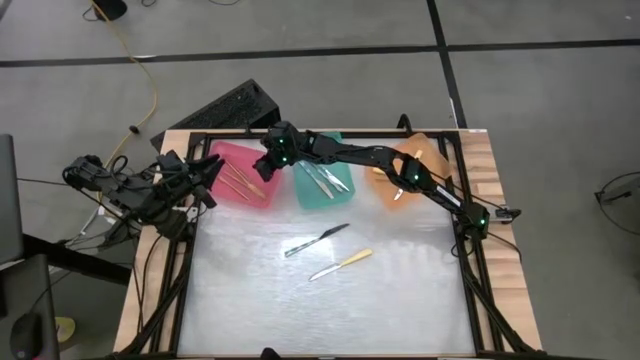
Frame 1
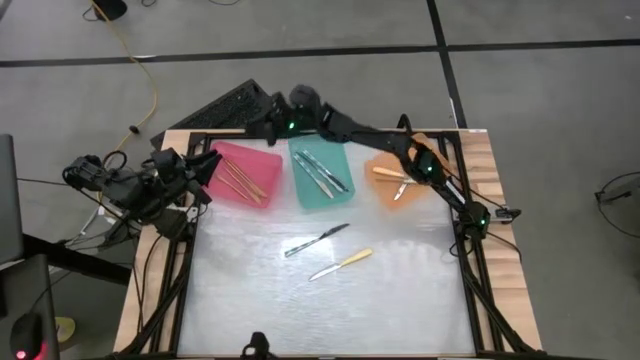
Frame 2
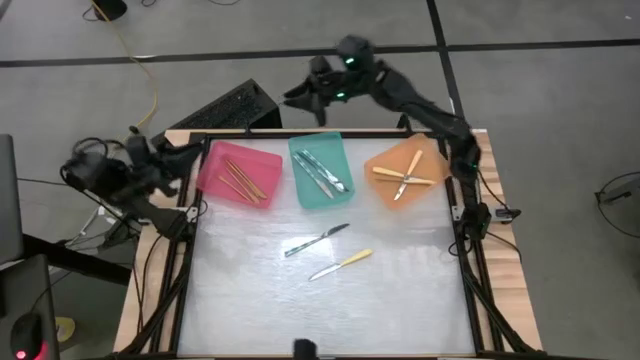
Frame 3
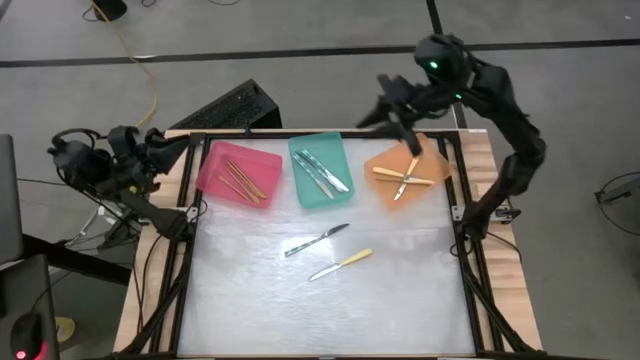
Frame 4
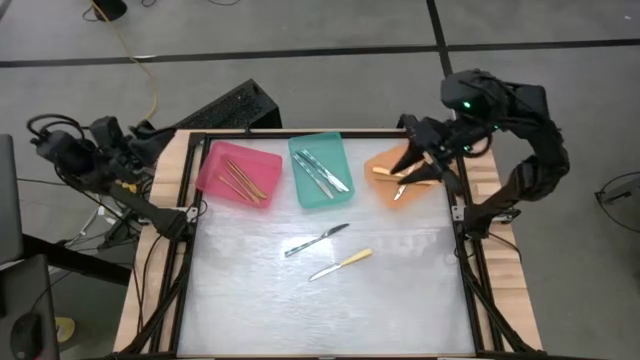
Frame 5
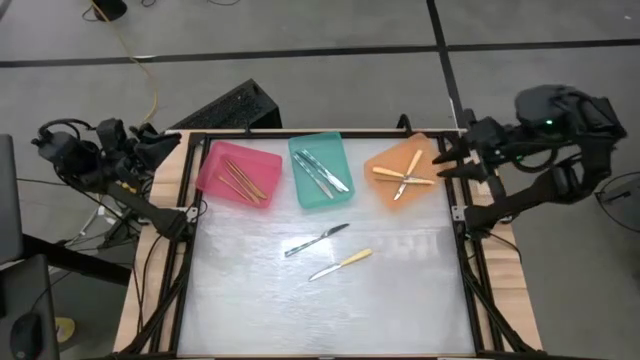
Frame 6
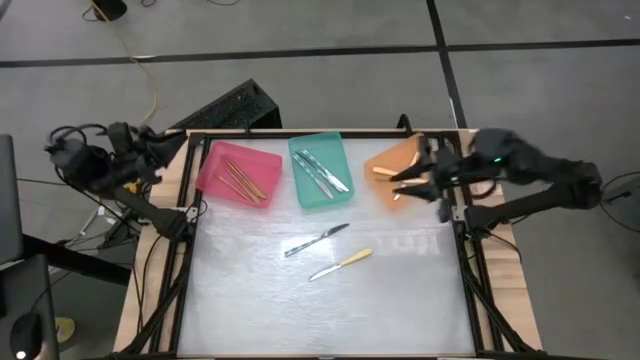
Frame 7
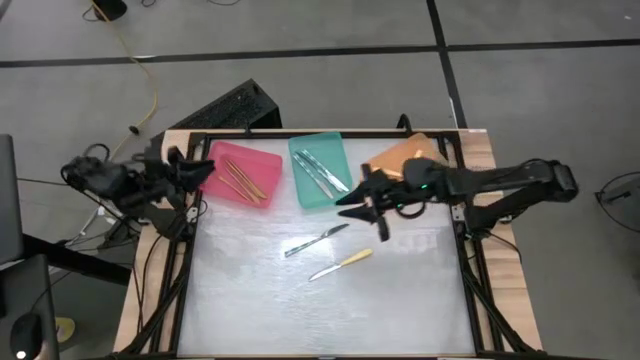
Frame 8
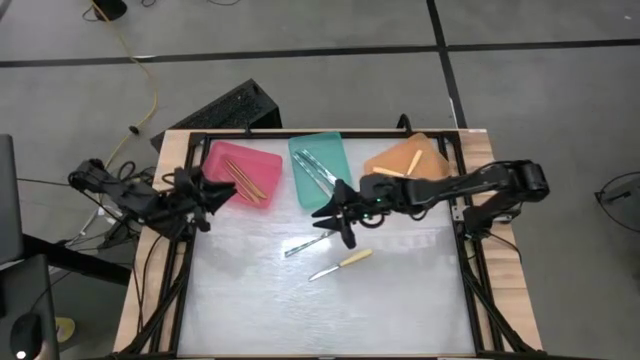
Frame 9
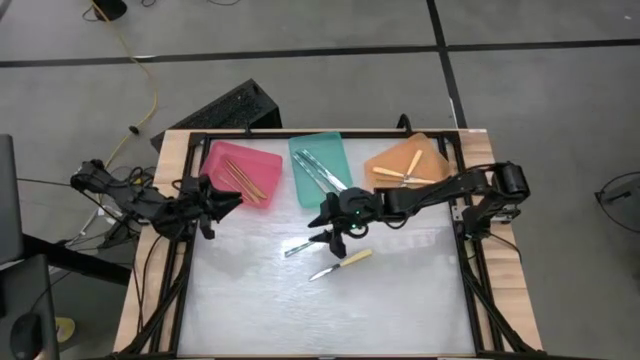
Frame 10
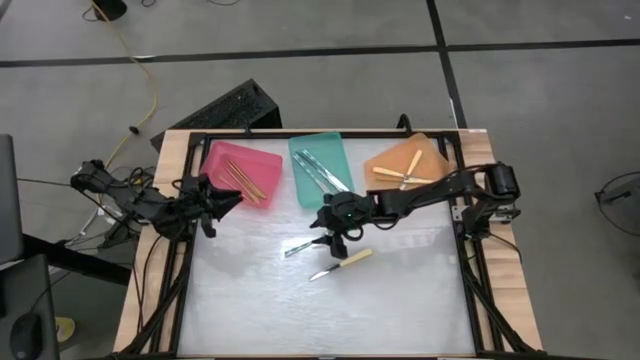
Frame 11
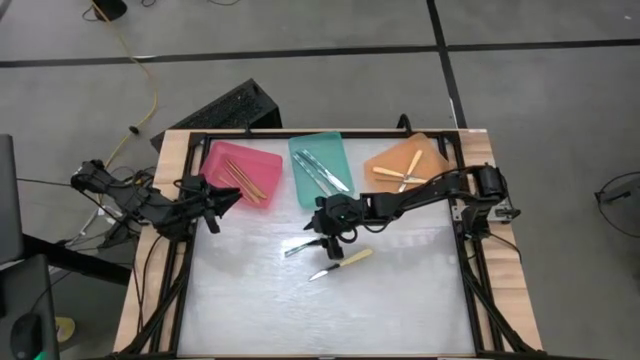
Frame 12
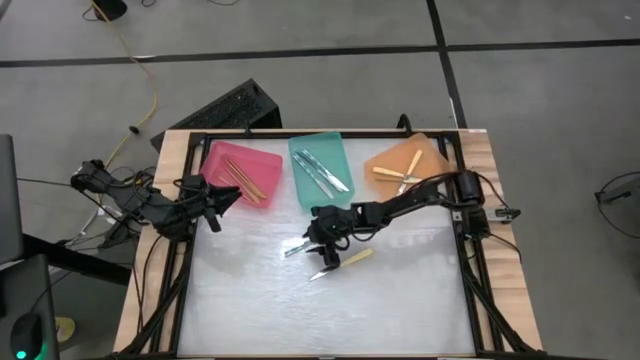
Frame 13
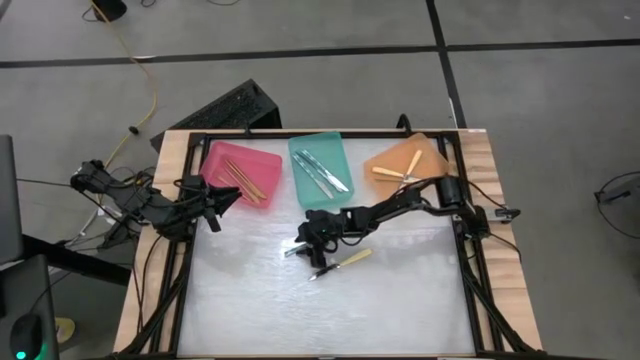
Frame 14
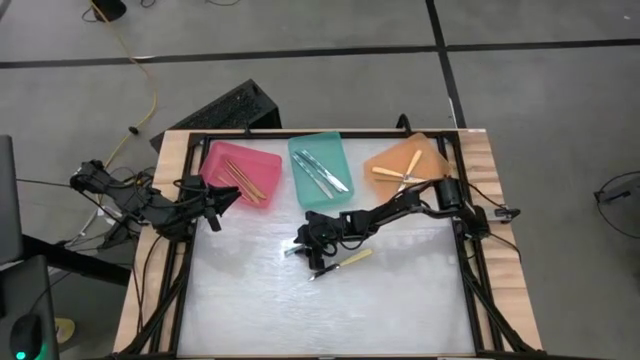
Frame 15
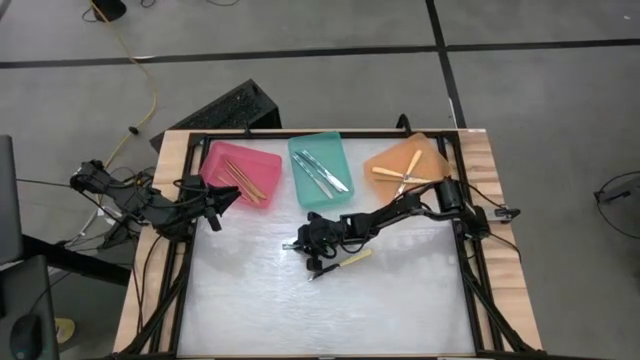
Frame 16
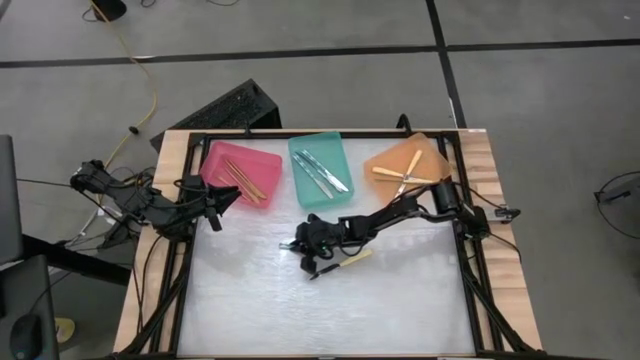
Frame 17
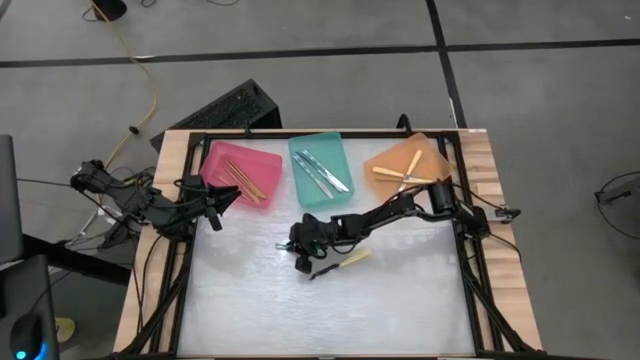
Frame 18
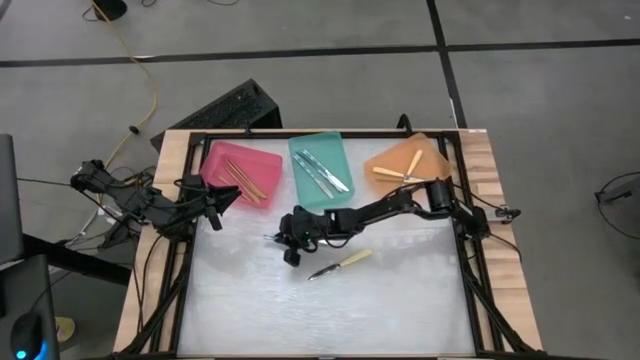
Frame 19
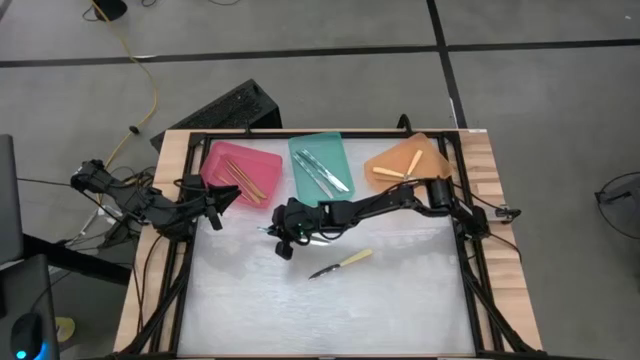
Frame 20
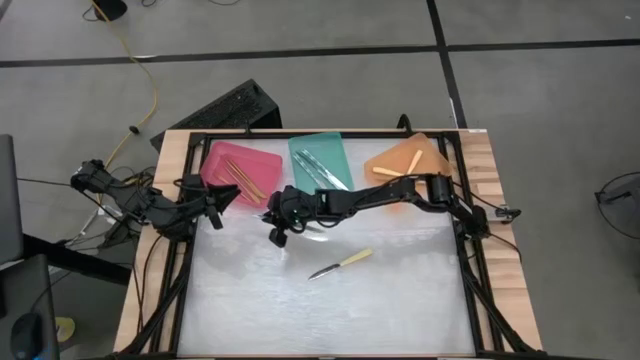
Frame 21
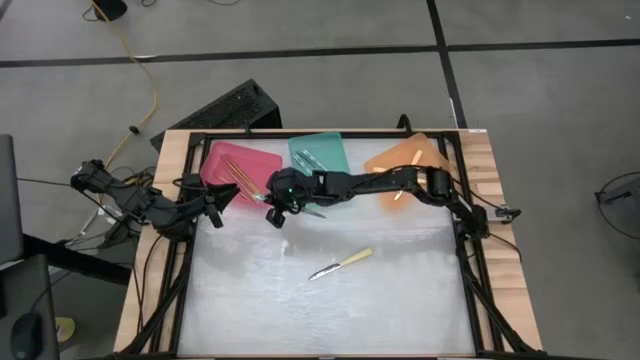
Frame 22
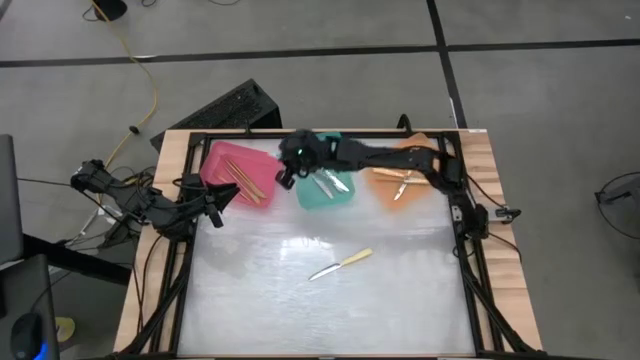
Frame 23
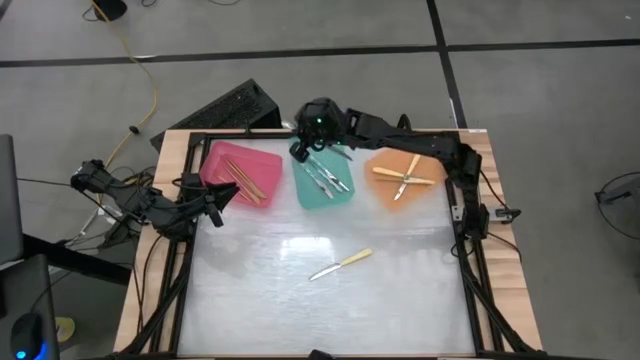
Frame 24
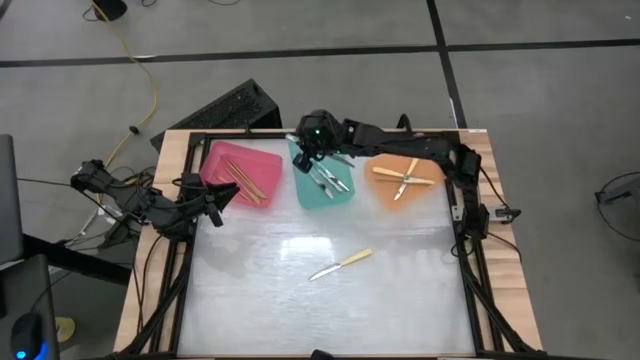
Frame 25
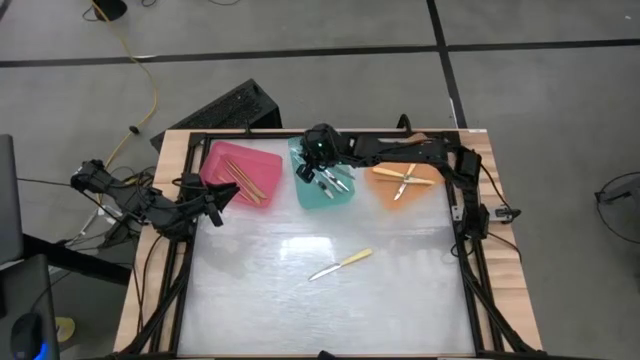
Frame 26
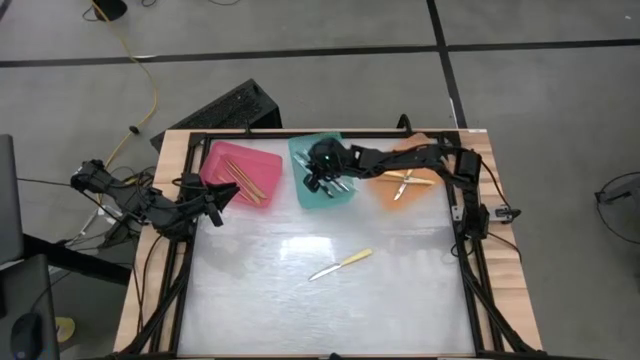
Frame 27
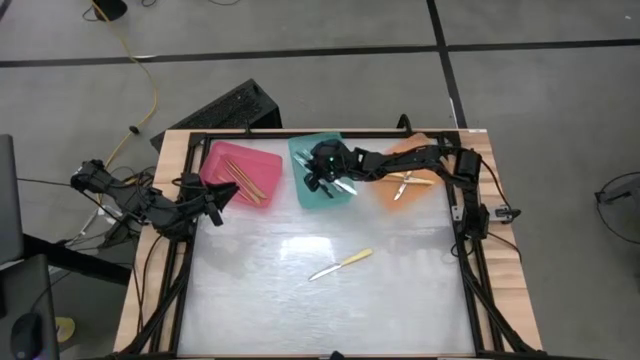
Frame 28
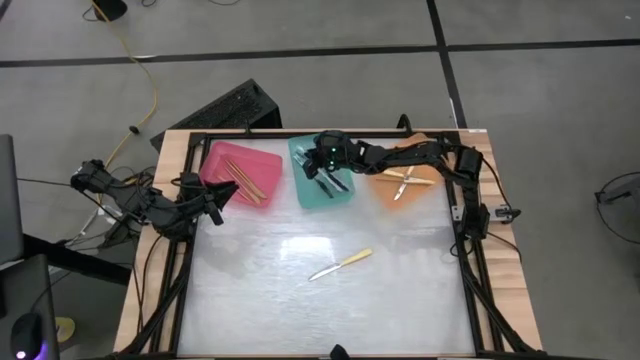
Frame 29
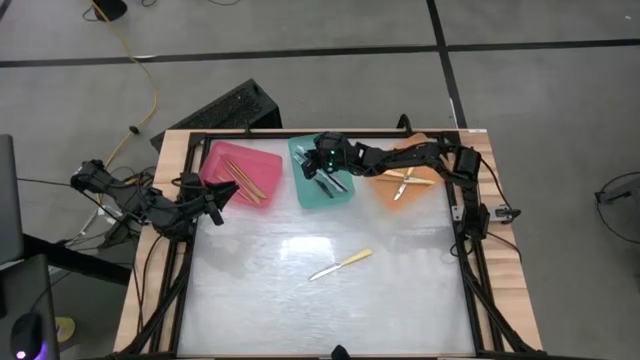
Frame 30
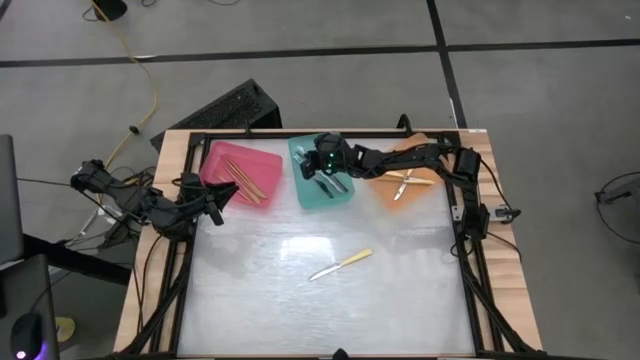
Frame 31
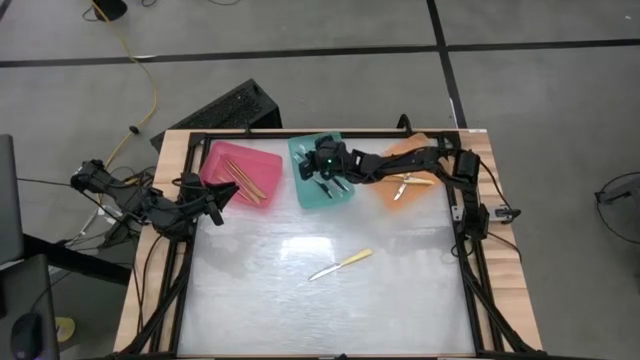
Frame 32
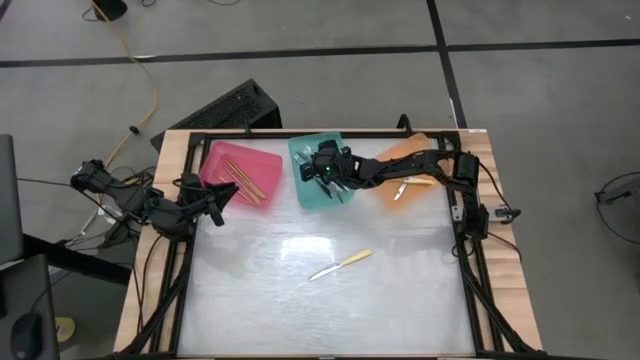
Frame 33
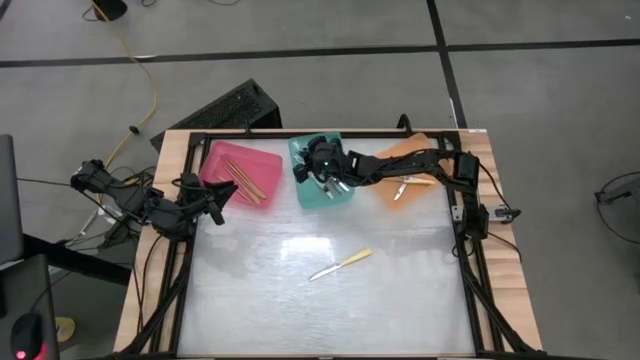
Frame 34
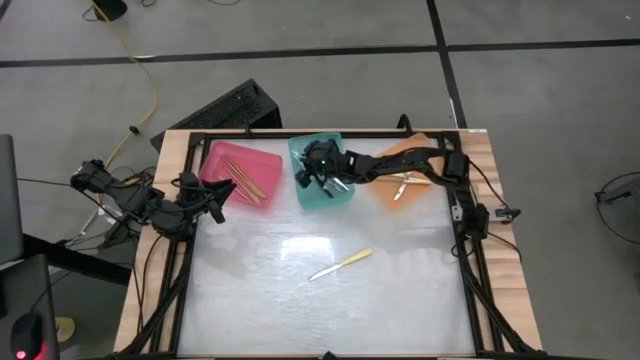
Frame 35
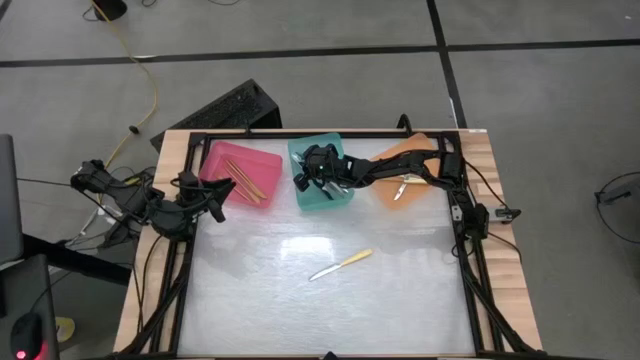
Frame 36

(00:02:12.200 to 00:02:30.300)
Task: Sort silverware by color (type)
Put the white and blue knife into the green bin

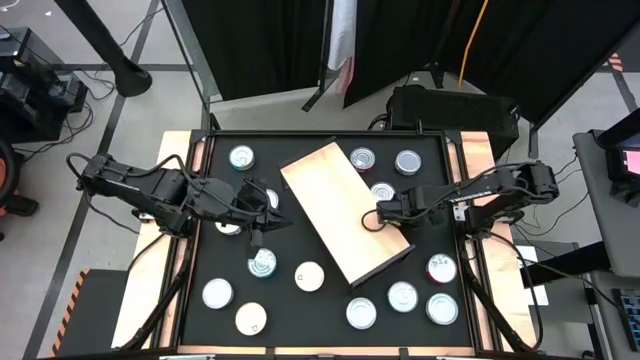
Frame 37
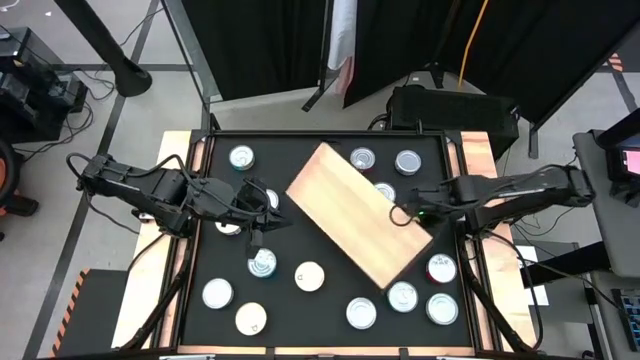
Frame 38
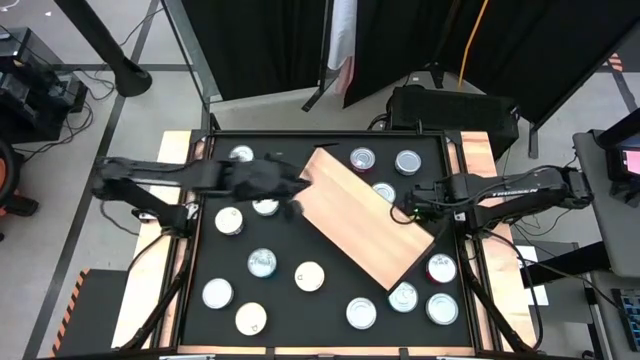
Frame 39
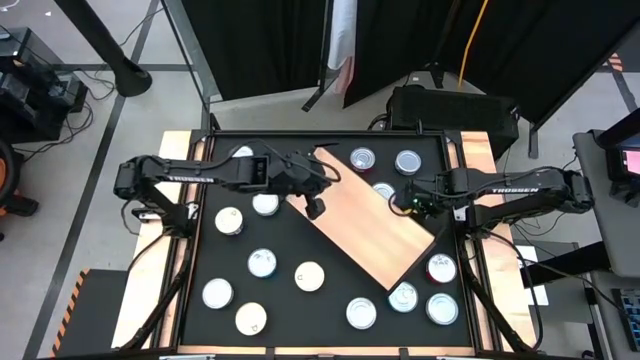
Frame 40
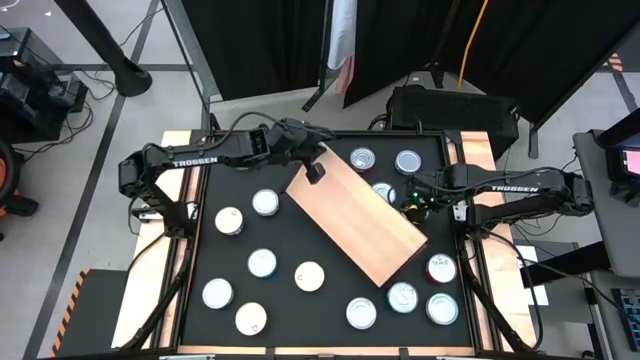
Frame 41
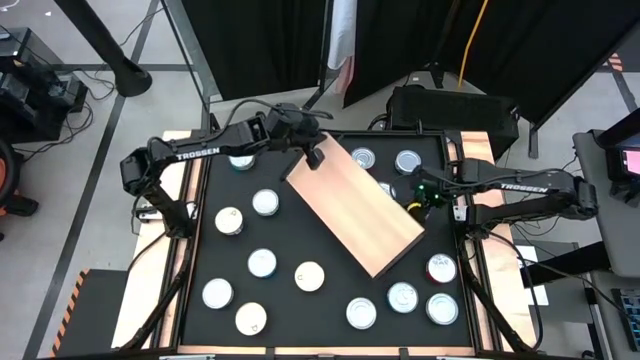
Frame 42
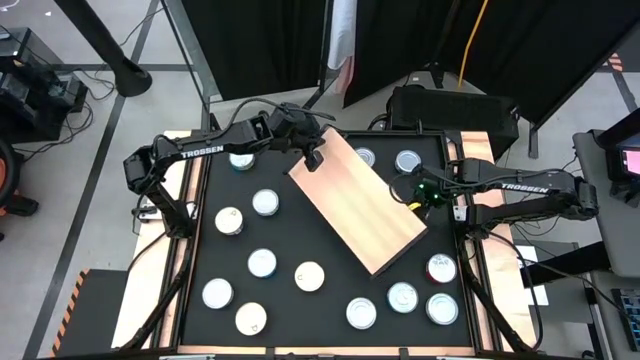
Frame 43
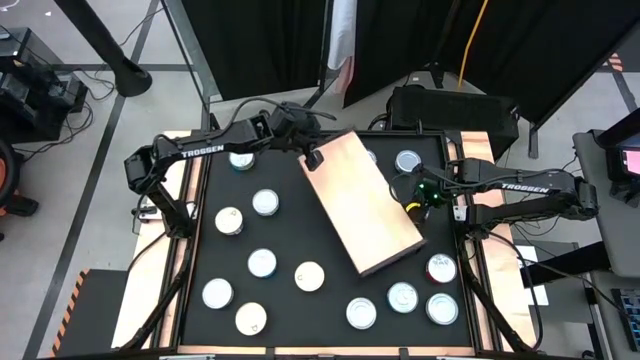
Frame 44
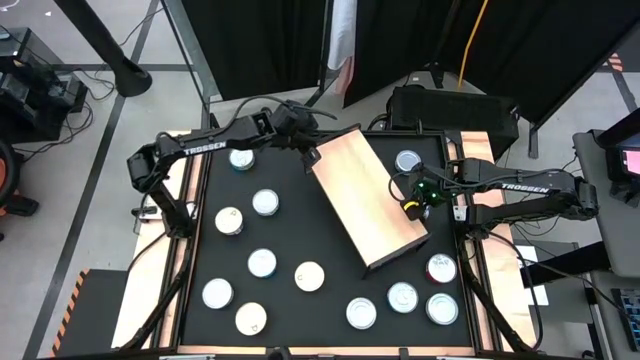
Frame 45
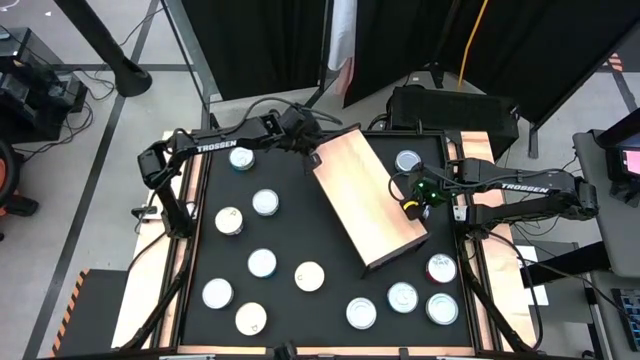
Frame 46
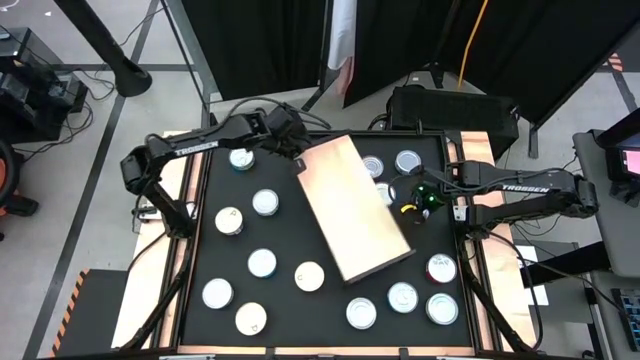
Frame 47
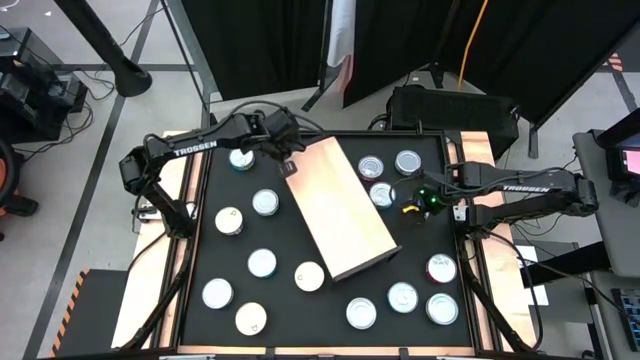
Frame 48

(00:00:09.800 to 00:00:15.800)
Task: Stack canned seafood by type on shelf
Adjust the shelf
